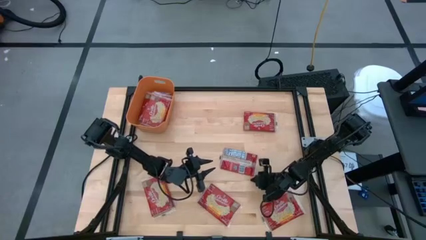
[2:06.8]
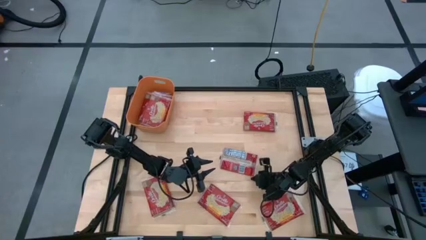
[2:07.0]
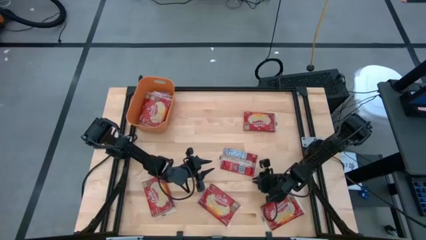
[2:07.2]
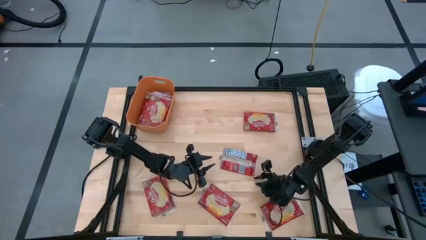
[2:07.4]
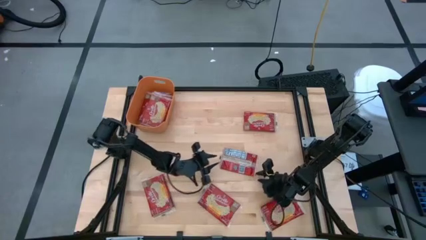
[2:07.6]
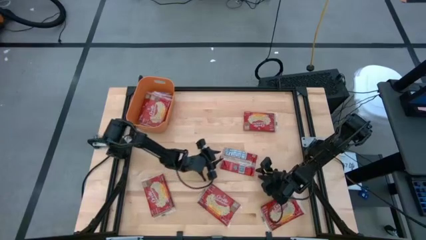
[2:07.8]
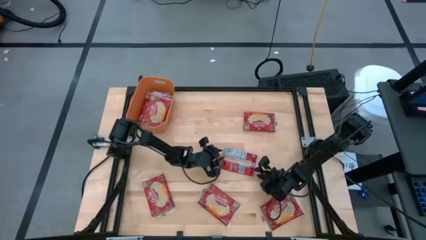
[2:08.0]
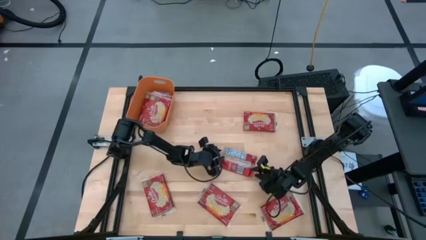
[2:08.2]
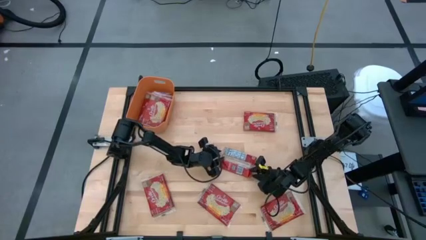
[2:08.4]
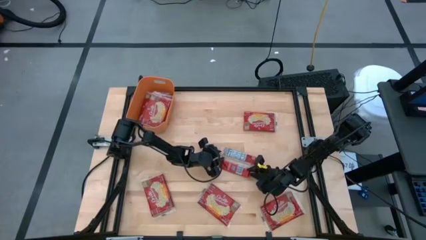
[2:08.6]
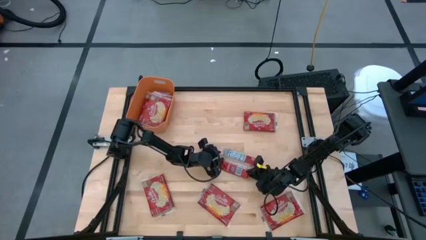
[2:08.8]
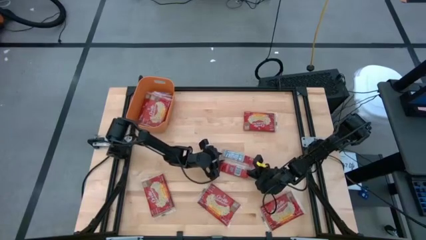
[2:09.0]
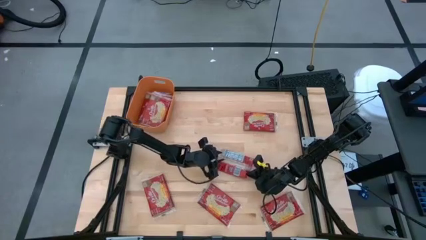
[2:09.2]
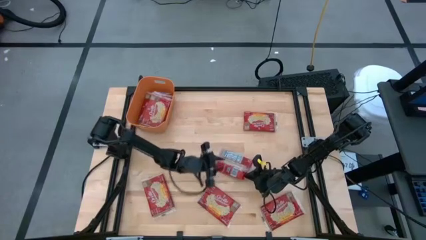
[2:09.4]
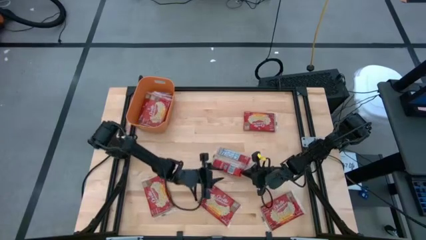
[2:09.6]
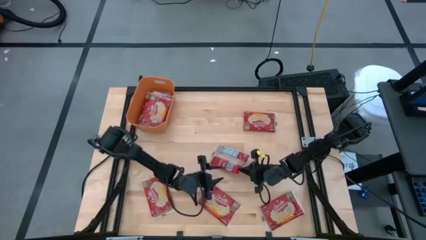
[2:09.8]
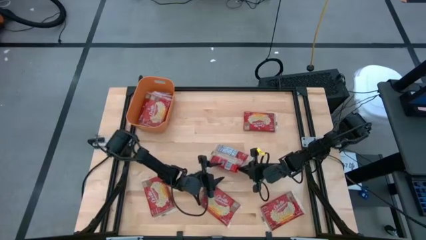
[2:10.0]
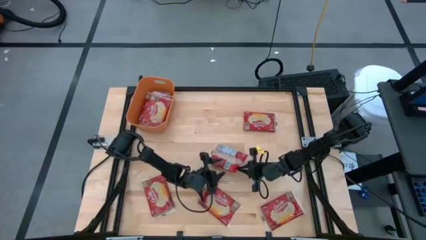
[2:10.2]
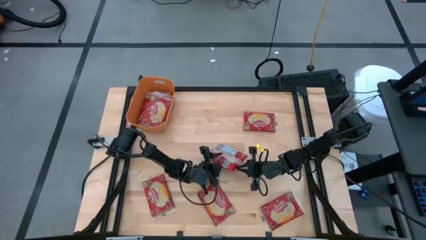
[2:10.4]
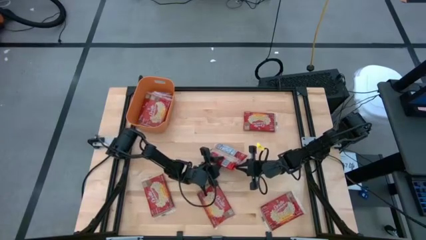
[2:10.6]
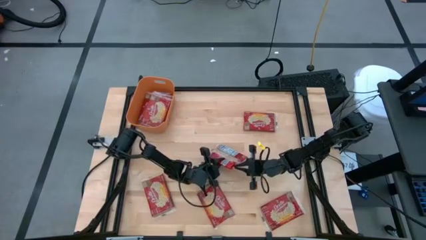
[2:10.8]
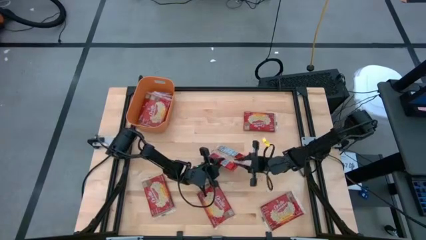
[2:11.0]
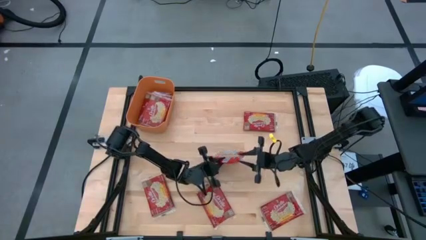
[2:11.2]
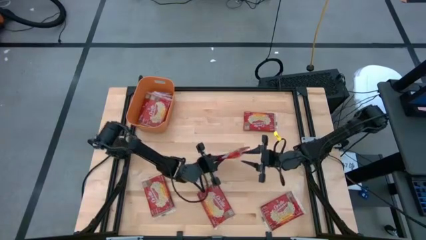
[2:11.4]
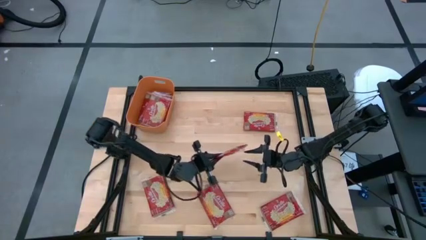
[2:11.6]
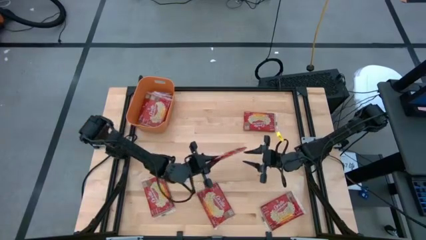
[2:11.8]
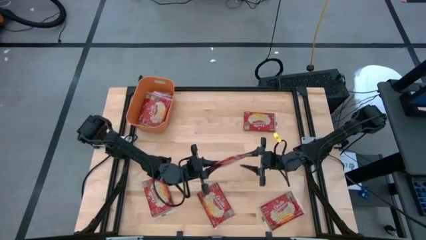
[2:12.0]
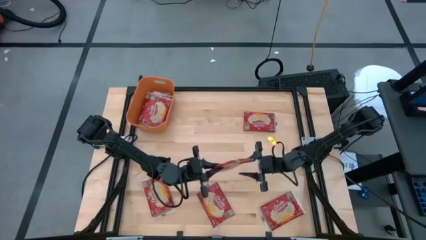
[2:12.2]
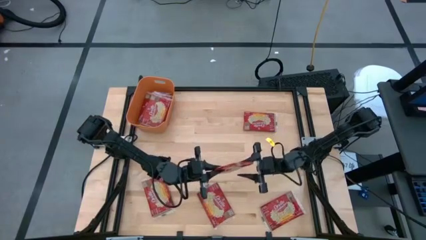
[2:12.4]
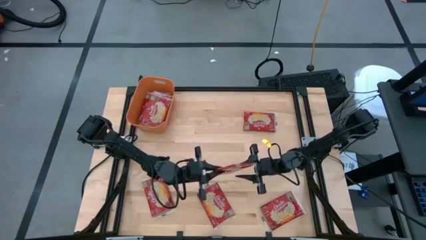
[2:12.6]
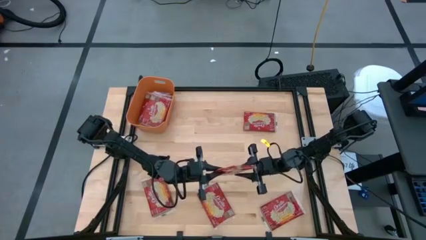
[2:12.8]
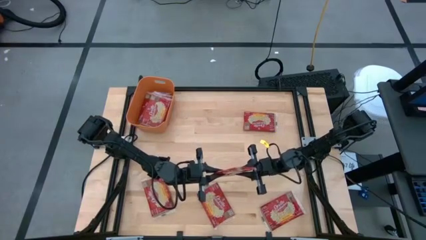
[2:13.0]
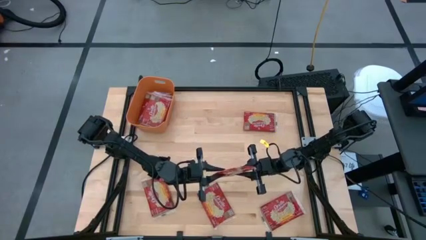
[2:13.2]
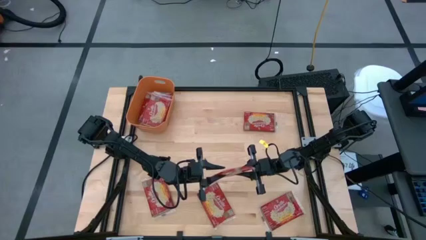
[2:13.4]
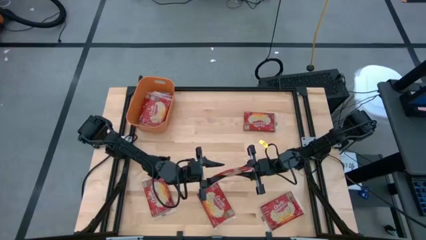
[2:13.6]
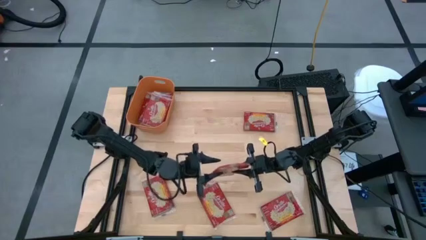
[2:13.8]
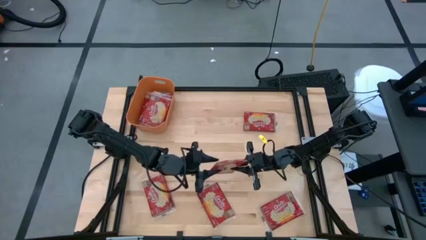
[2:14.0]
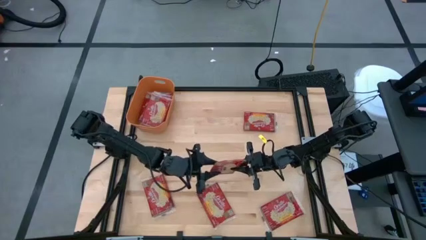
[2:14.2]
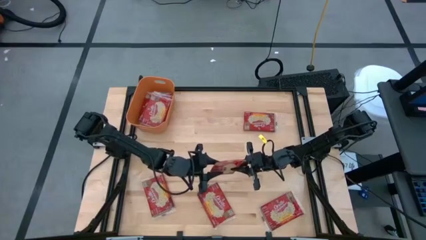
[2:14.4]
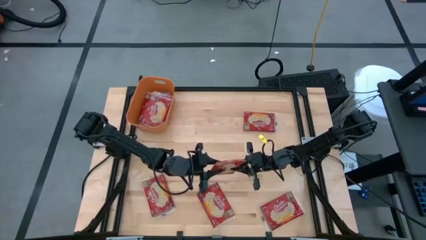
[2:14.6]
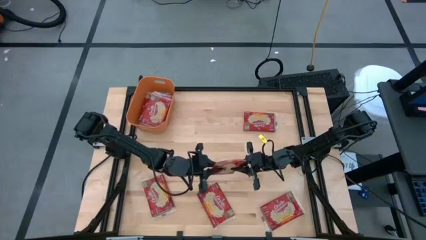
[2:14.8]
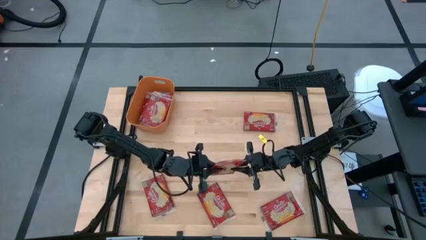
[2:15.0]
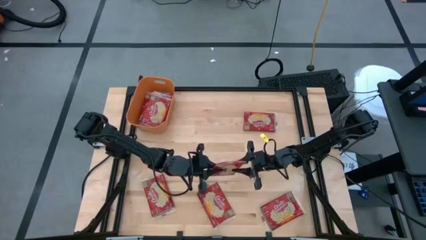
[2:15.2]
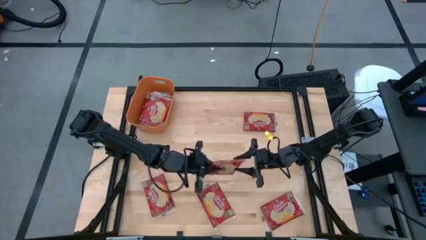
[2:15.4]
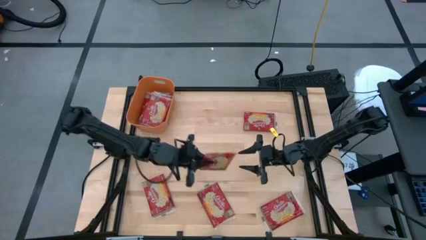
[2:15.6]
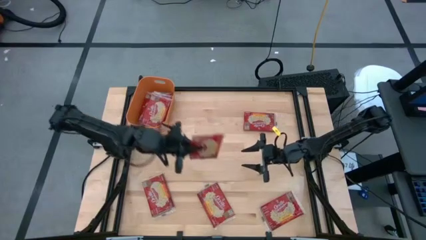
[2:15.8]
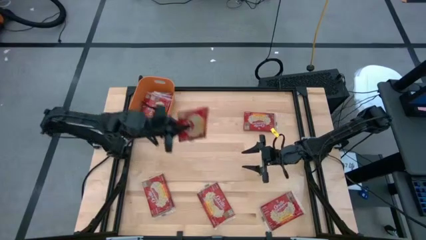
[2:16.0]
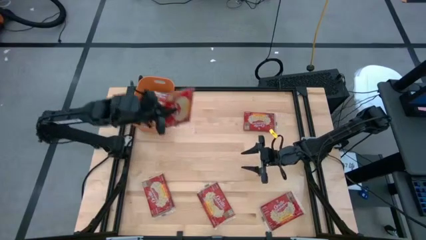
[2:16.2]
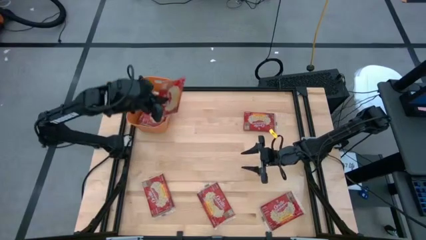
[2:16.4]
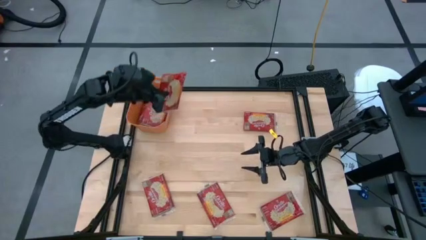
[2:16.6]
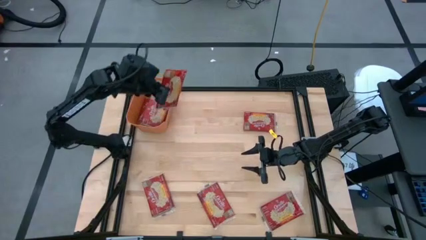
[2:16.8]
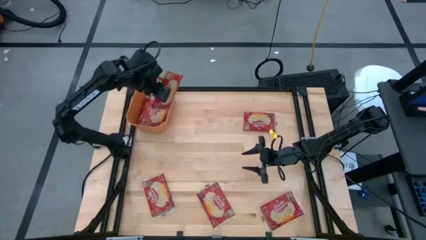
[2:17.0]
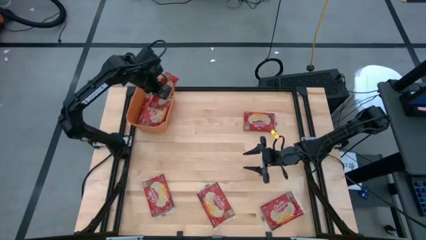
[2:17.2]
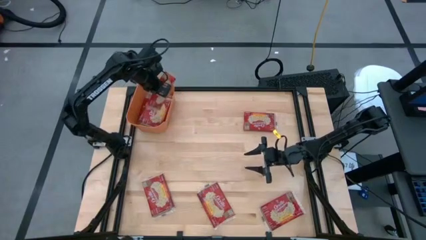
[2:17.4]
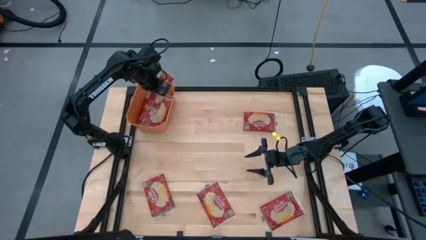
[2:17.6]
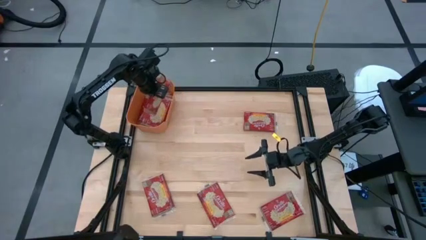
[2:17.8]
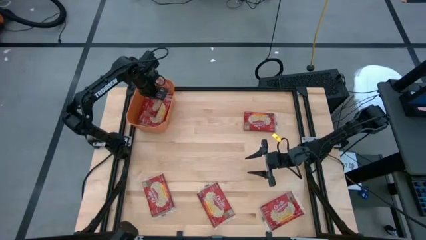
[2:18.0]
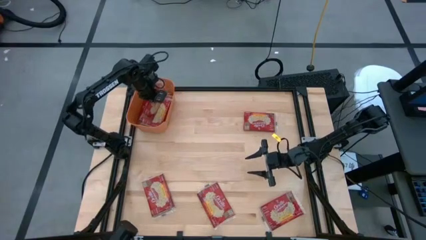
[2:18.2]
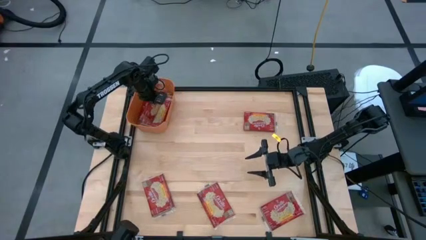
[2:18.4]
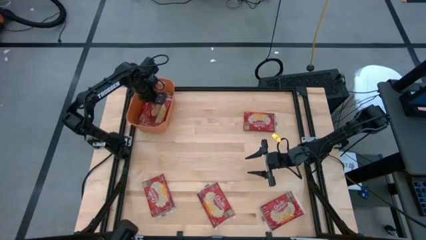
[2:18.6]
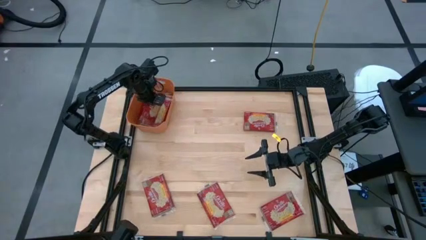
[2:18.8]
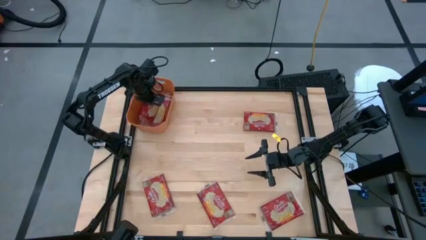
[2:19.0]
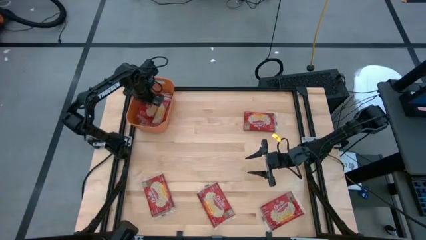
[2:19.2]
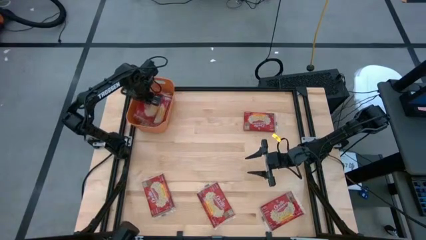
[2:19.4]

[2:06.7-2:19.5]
Task: Sort popcorn bags into baskets
Put the red popcorn bag into the orange bin

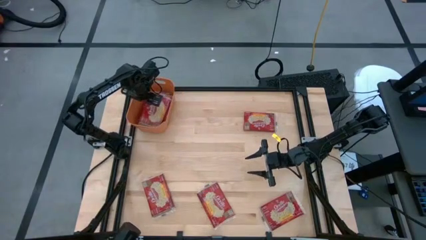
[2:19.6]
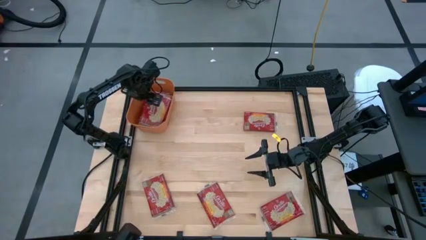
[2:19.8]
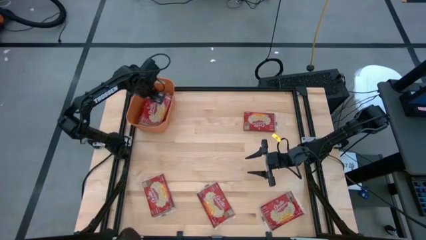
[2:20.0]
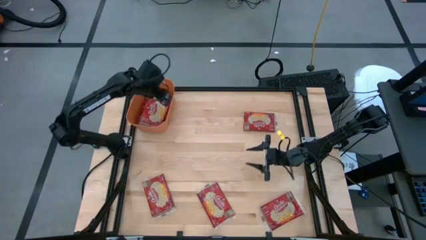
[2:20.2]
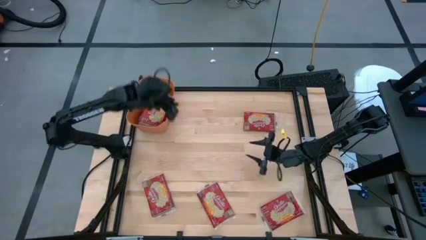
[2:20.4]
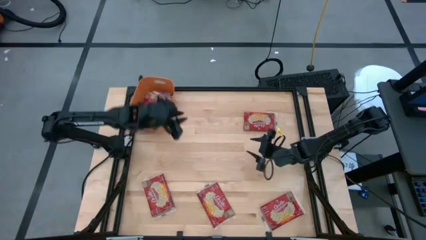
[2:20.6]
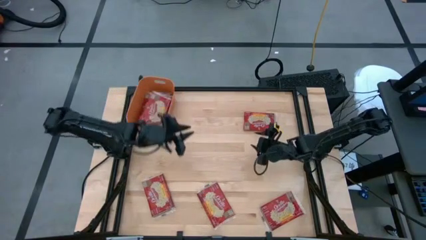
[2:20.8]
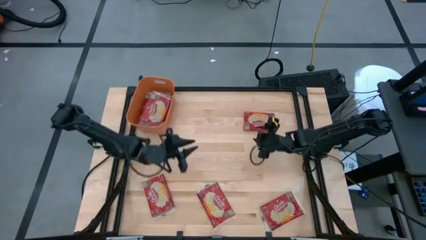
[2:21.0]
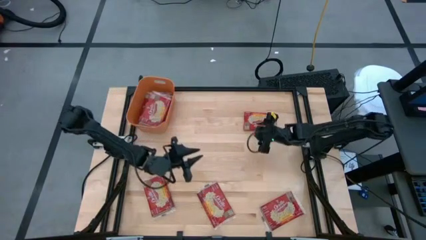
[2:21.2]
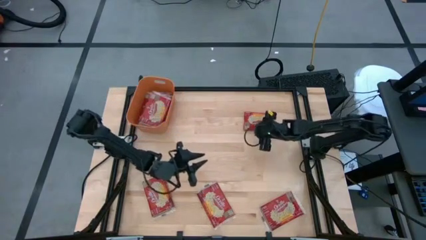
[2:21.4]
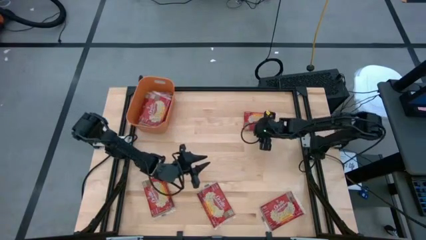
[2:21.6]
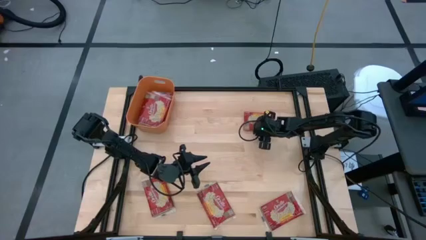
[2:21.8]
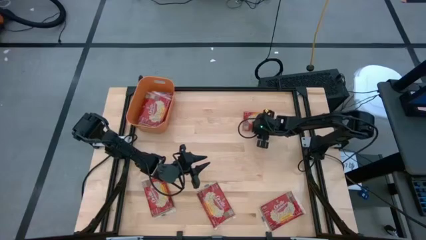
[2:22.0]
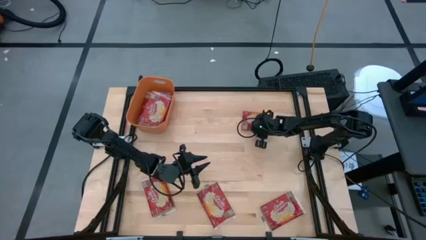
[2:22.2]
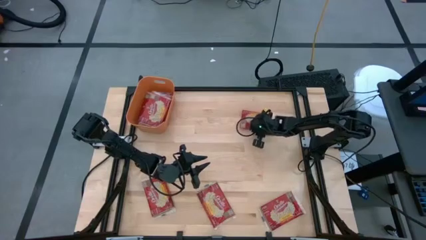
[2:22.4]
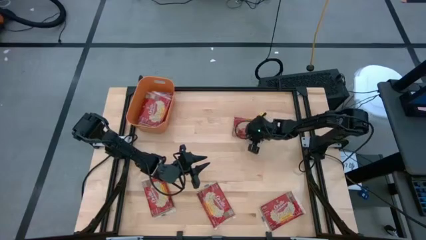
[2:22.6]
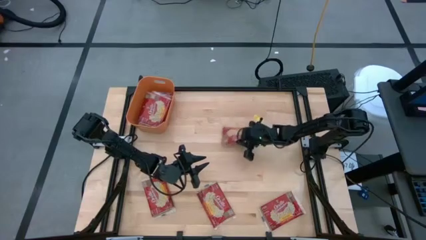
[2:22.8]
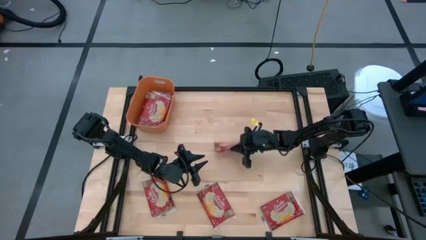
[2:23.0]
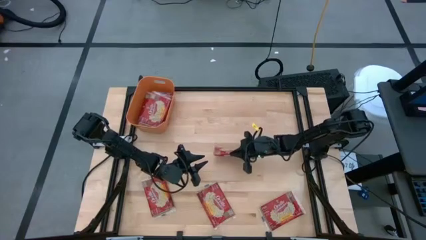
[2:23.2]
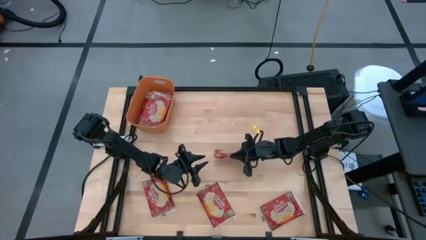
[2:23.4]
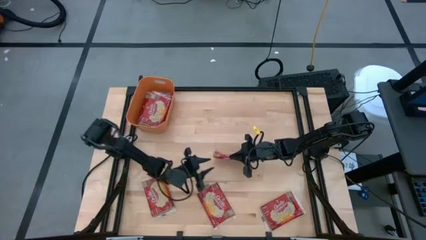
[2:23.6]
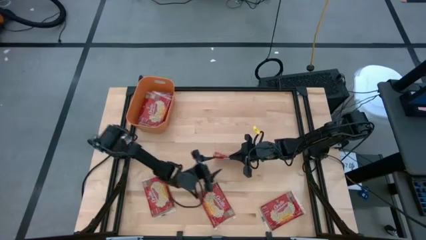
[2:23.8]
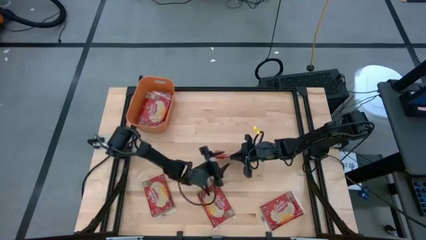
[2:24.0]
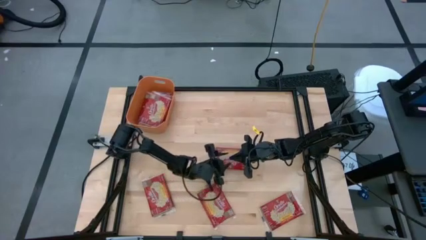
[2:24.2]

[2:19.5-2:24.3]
Put the red popcorn bag into the orange bin
